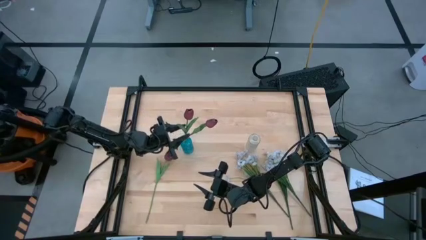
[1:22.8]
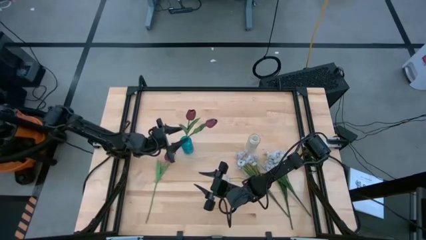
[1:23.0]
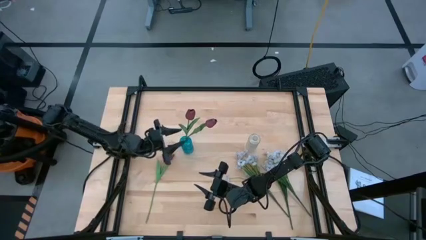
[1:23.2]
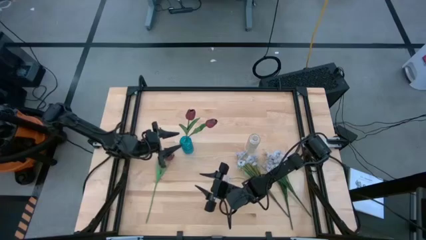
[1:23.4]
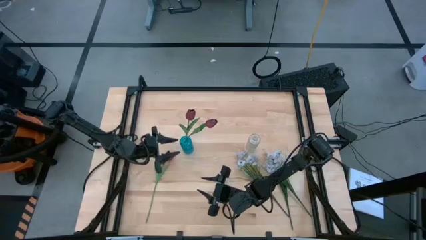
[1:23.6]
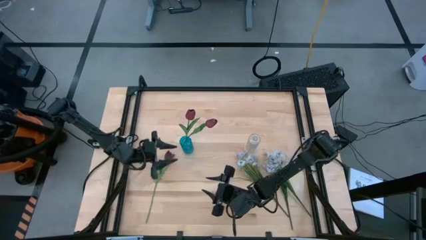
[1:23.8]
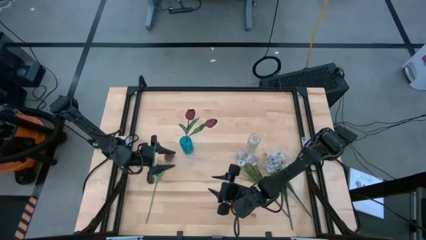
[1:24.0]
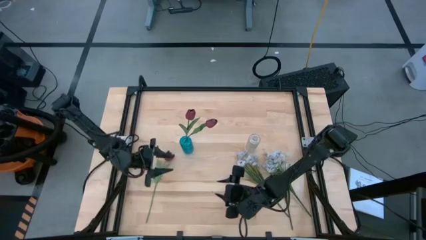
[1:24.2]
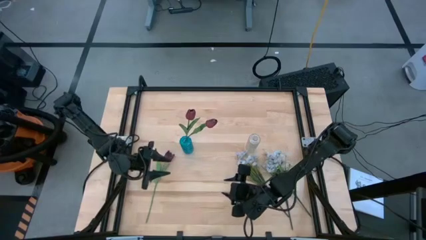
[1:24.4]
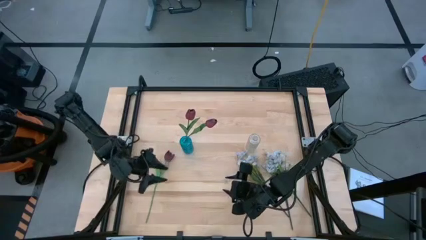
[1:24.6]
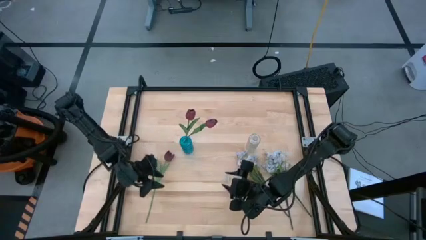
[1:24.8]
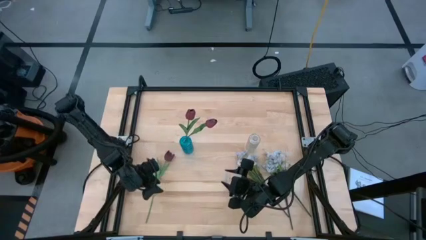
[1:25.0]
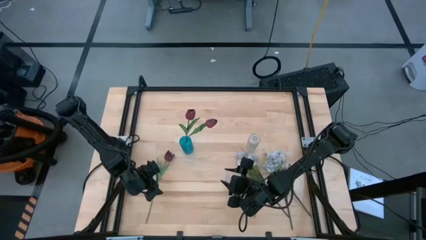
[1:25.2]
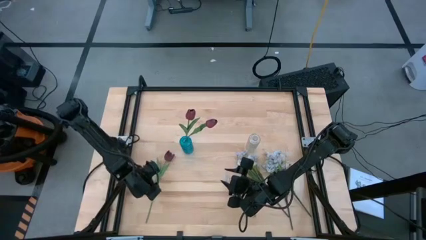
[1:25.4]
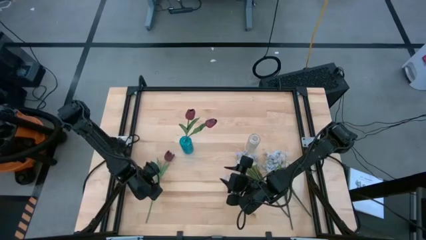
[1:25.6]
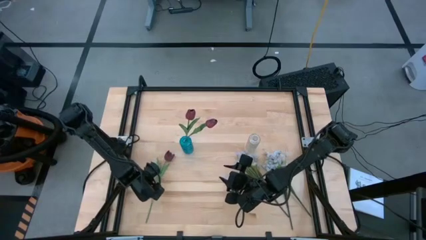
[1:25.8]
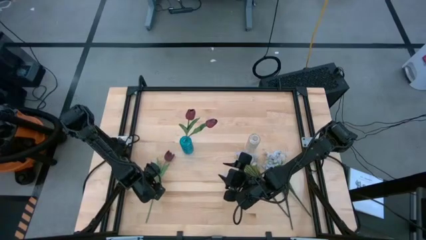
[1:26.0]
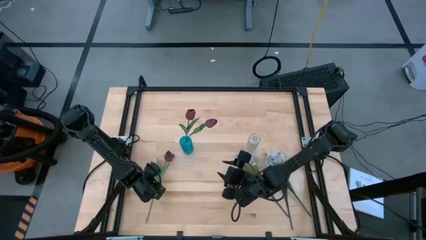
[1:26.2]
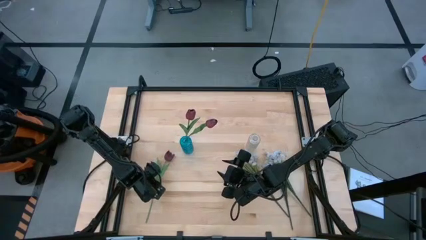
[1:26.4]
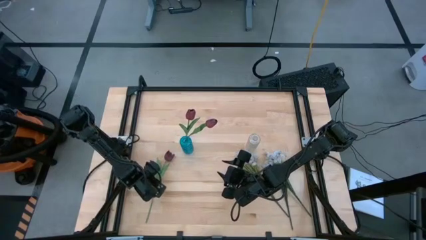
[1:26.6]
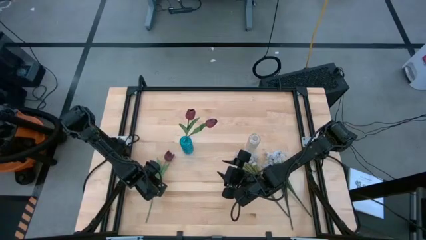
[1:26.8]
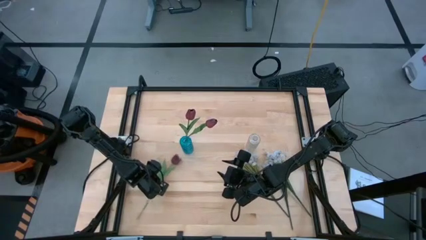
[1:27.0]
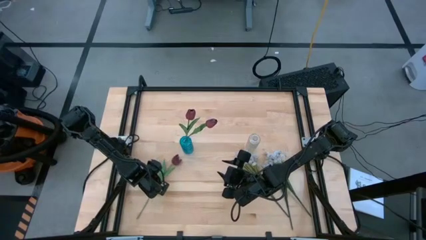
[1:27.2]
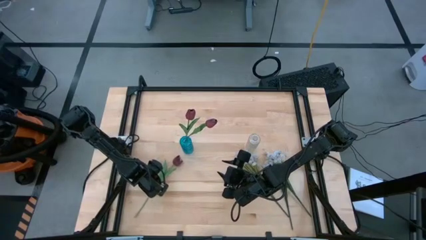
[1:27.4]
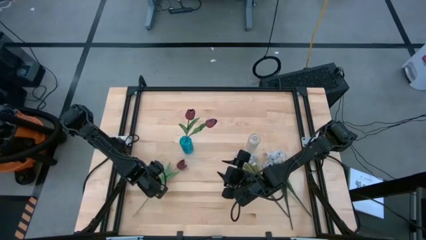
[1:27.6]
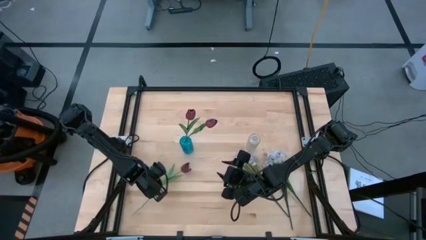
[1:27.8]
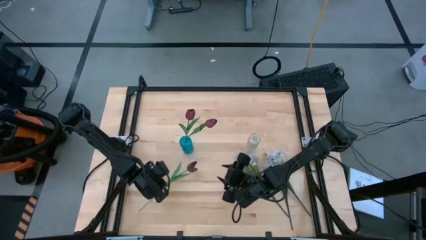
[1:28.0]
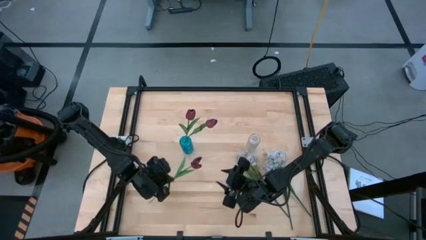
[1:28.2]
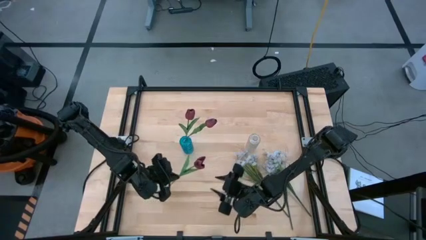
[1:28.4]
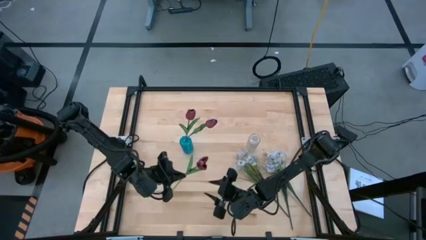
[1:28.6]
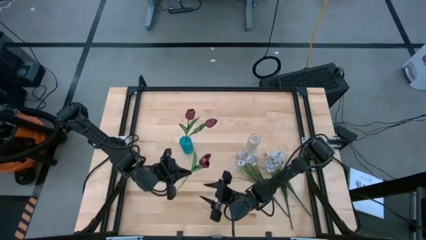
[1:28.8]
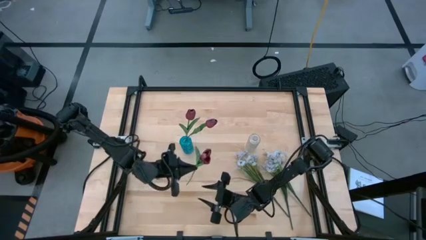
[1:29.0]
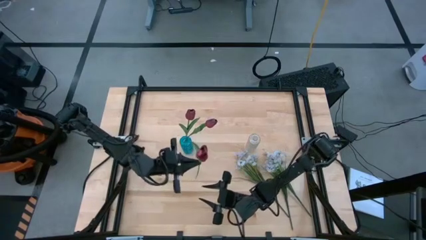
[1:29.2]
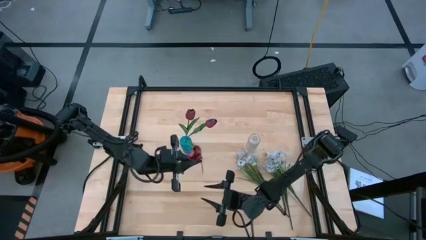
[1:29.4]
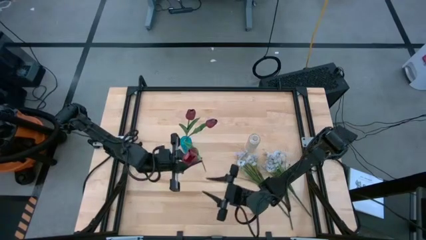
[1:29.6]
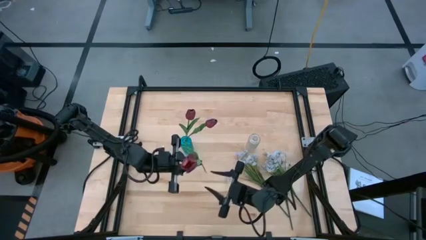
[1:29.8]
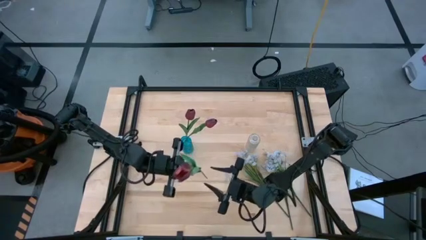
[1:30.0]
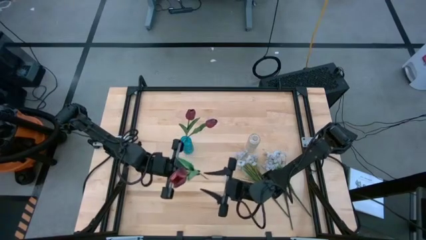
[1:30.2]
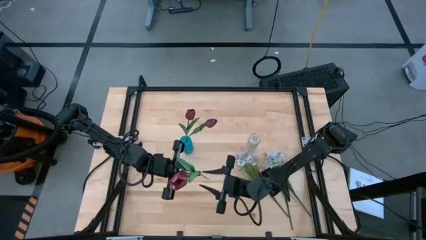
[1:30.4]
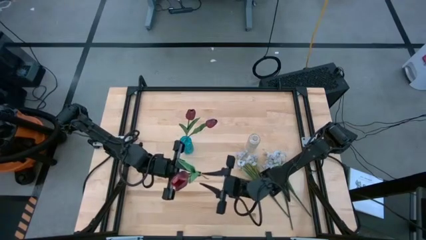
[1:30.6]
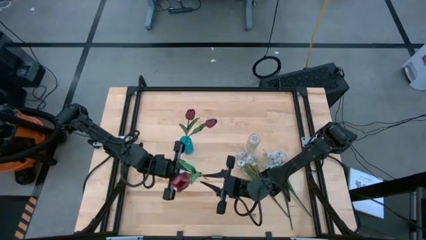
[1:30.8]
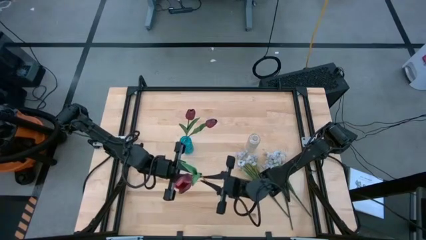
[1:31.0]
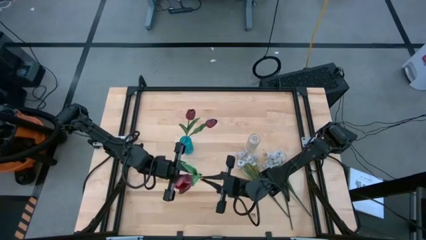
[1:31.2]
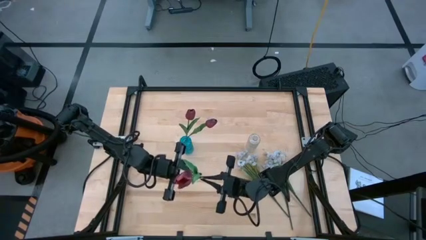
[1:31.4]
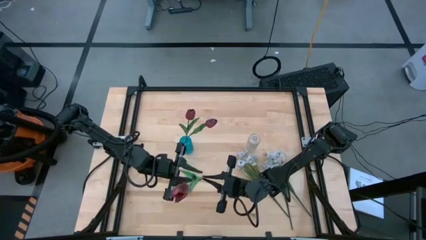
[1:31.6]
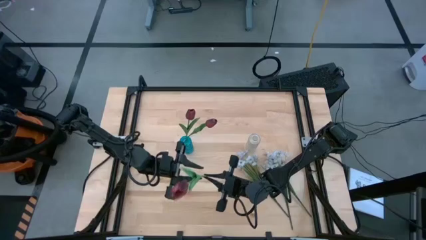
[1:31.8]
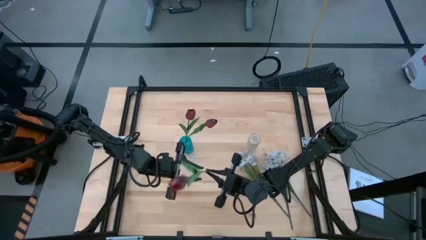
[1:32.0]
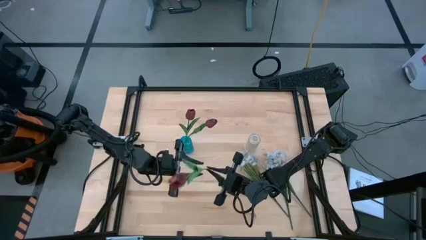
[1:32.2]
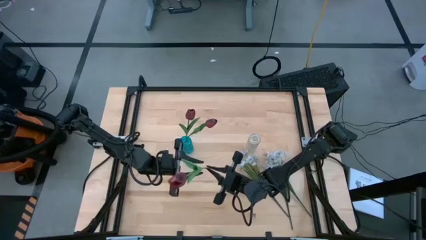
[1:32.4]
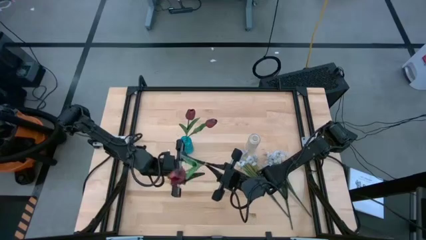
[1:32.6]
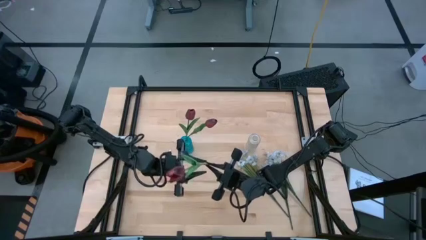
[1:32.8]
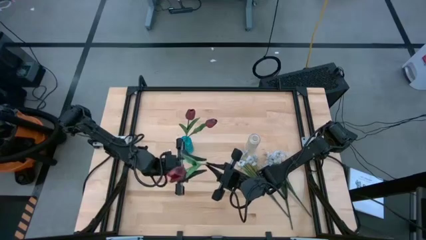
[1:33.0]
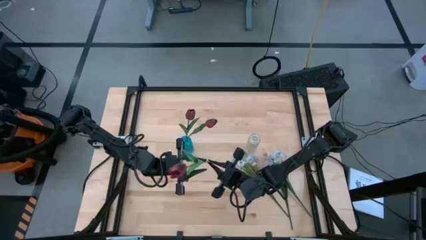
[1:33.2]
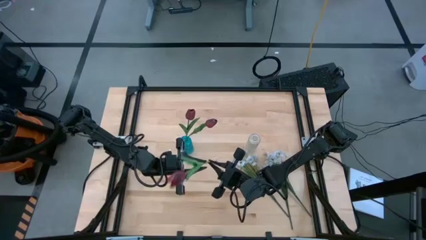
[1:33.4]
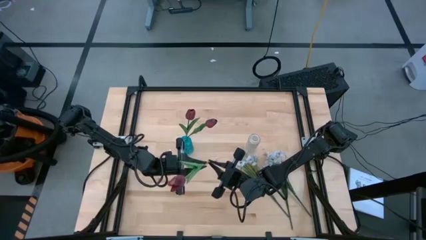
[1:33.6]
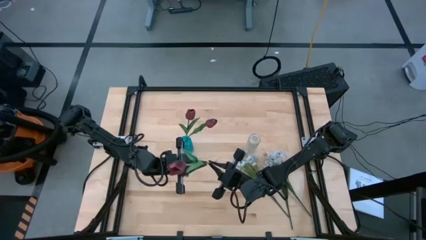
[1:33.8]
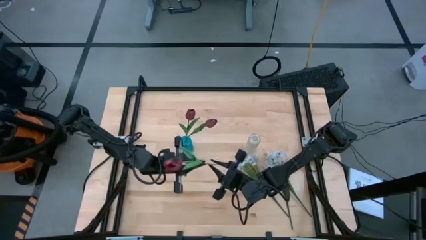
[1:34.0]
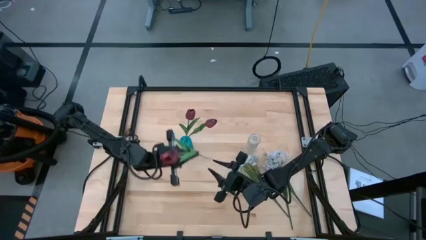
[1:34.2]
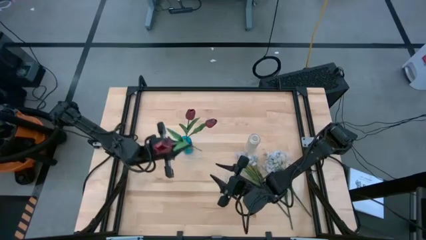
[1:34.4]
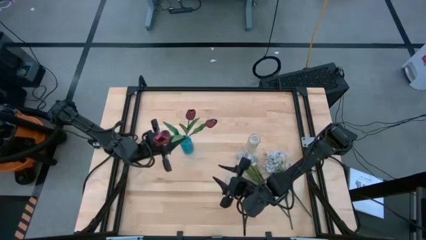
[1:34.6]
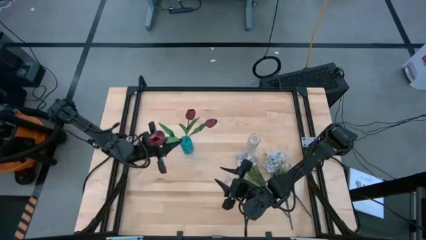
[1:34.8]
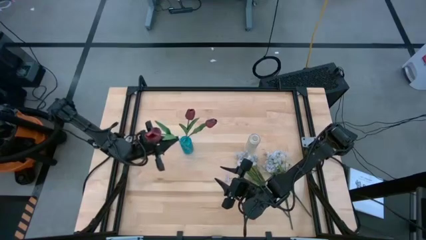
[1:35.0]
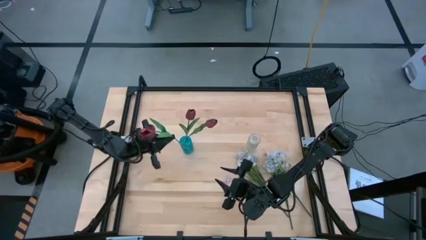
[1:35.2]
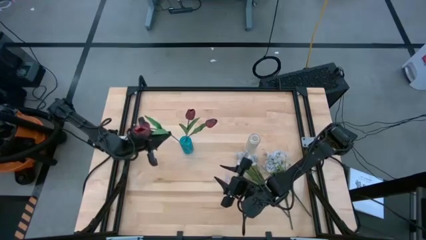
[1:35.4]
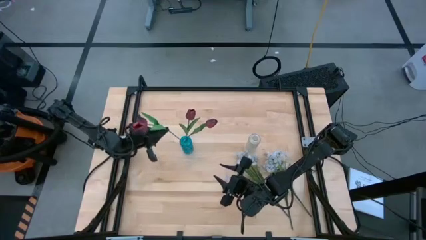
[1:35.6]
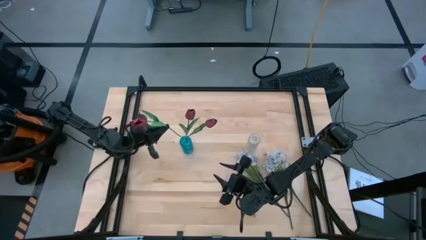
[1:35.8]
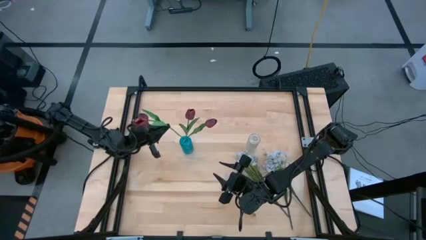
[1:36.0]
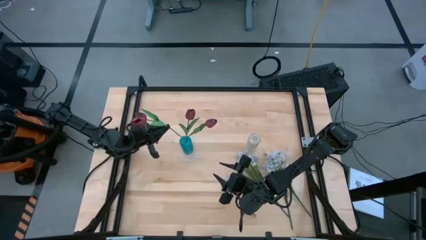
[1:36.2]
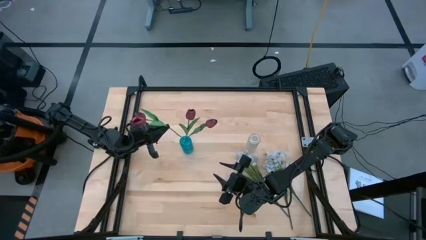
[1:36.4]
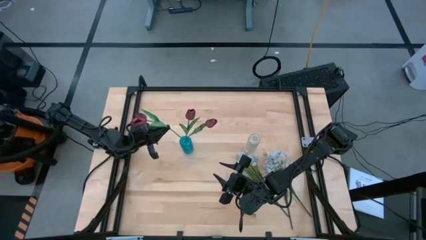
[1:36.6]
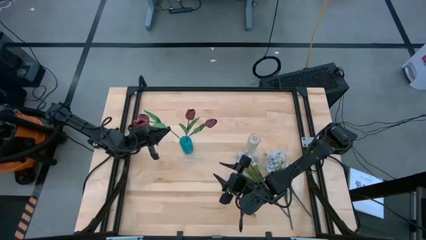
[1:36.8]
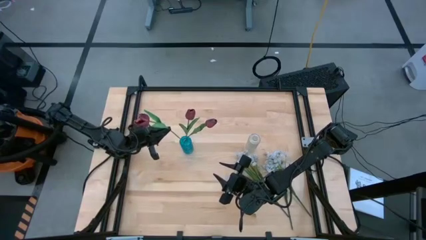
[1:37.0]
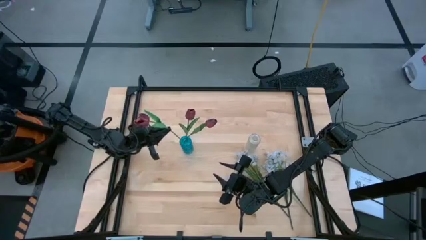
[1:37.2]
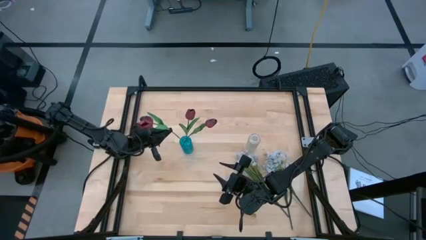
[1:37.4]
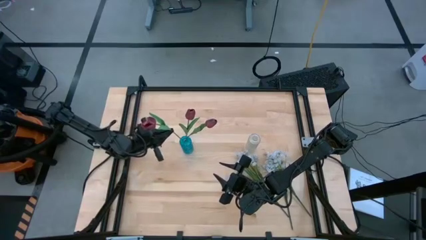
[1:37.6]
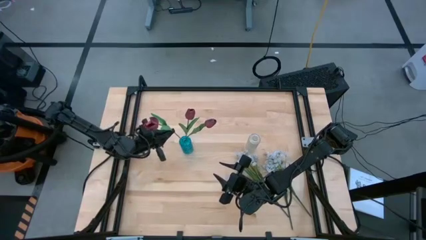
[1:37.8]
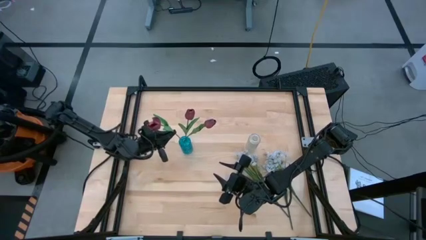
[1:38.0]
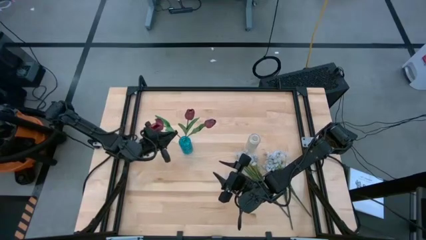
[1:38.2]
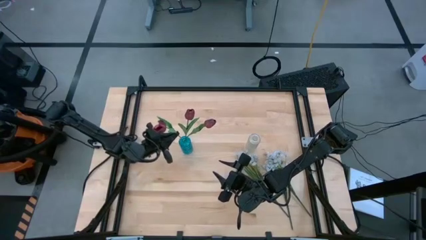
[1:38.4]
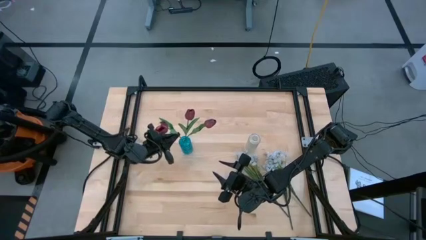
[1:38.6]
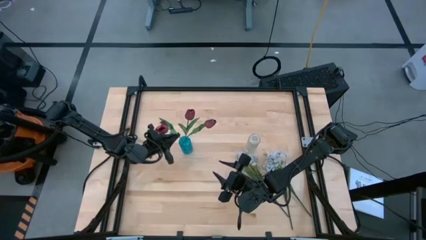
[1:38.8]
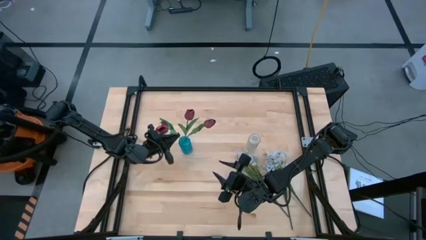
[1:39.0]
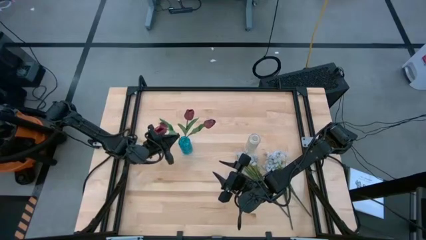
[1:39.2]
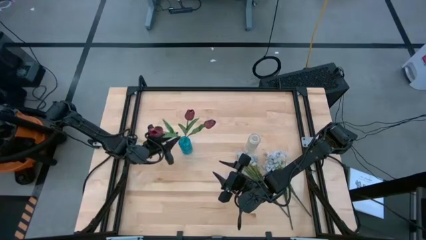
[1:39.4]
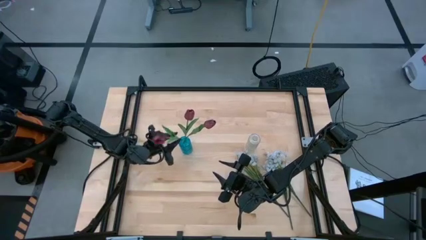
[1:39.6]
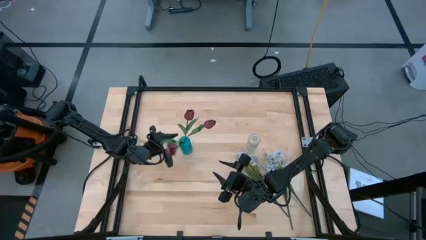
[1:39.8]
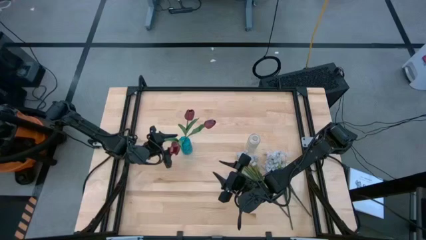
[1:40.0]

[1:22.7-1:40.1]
Task: Sort flowers into vase by color
Put the red tulip into the blue vase
